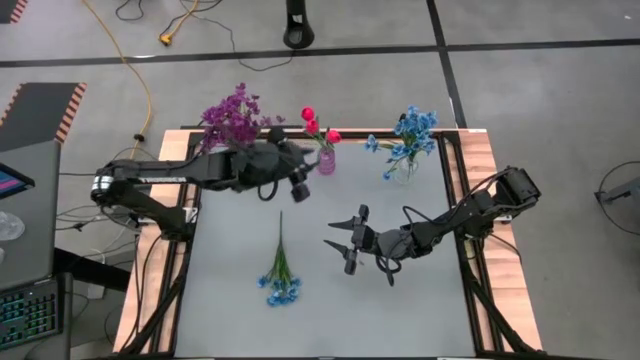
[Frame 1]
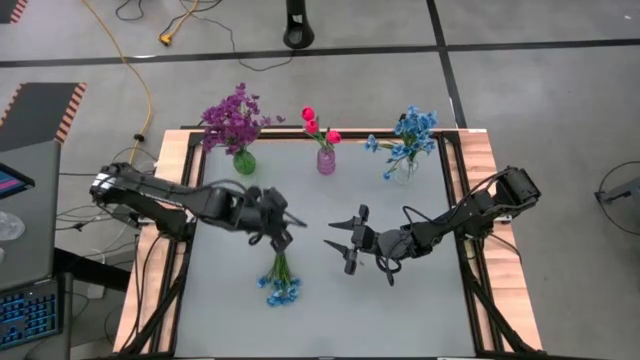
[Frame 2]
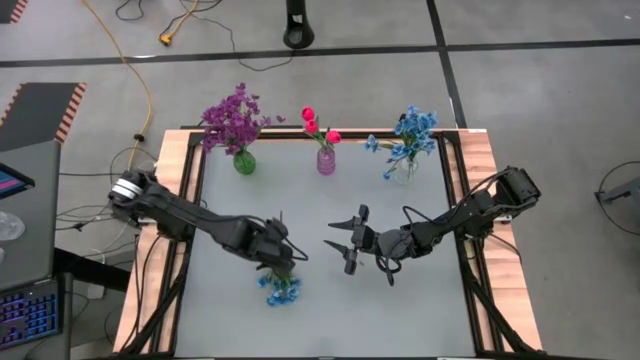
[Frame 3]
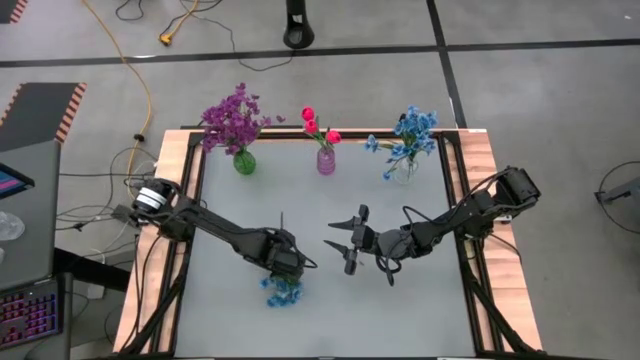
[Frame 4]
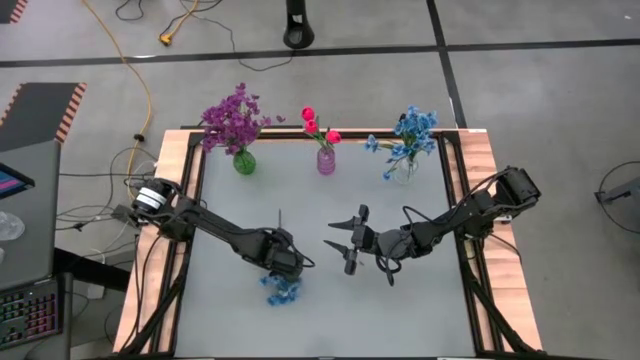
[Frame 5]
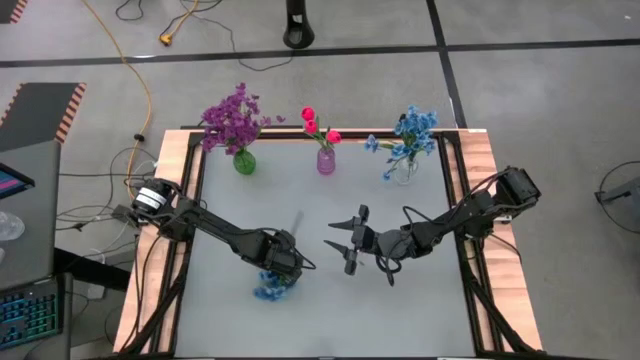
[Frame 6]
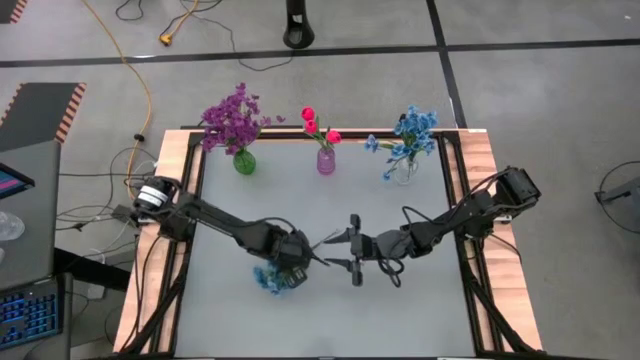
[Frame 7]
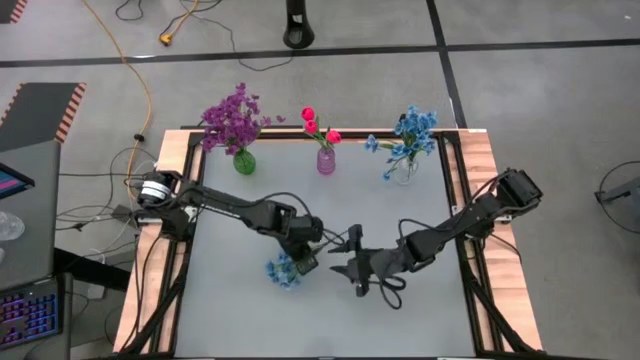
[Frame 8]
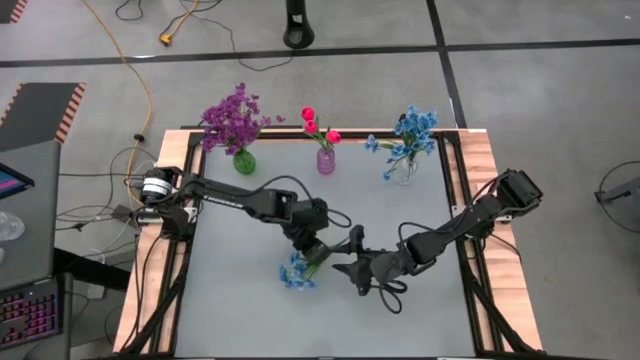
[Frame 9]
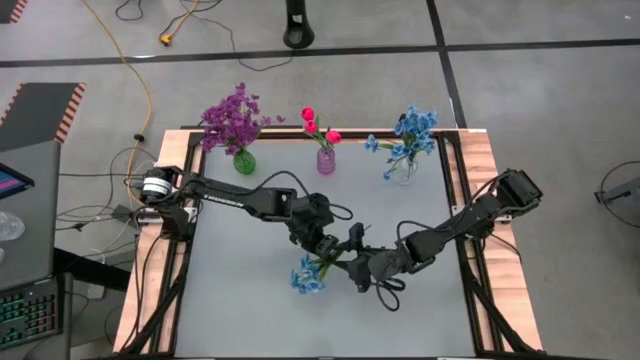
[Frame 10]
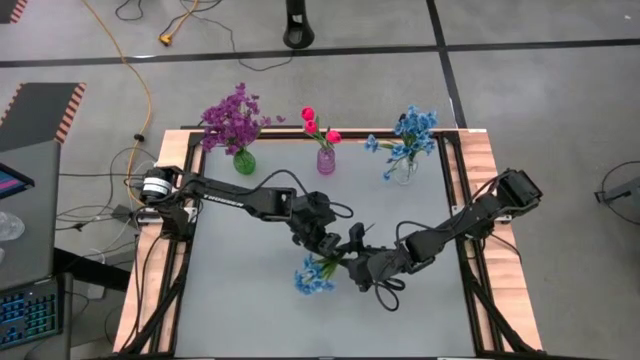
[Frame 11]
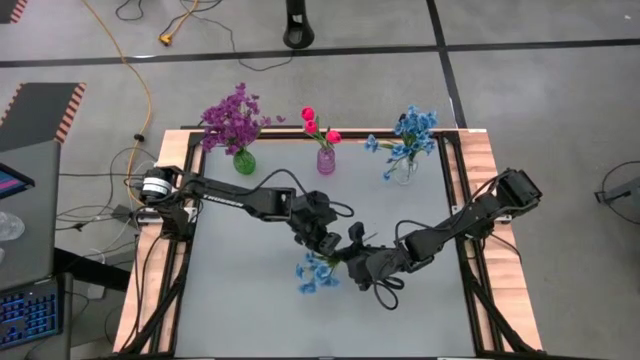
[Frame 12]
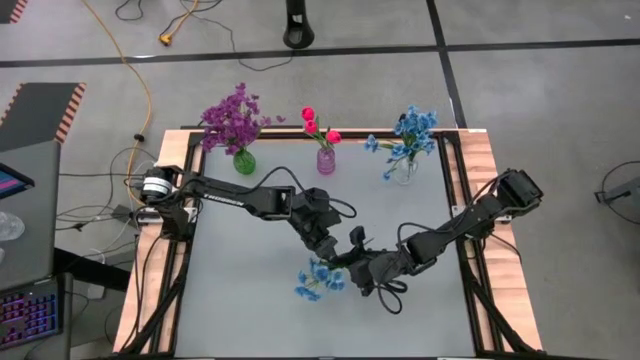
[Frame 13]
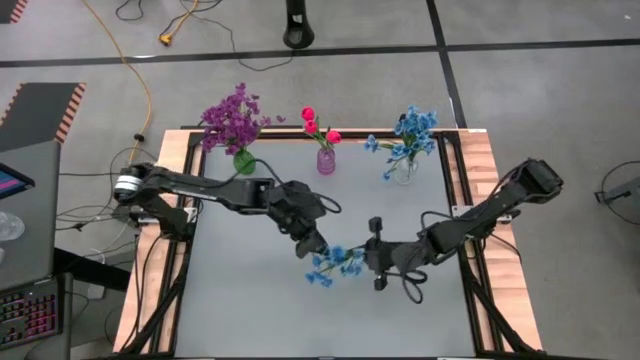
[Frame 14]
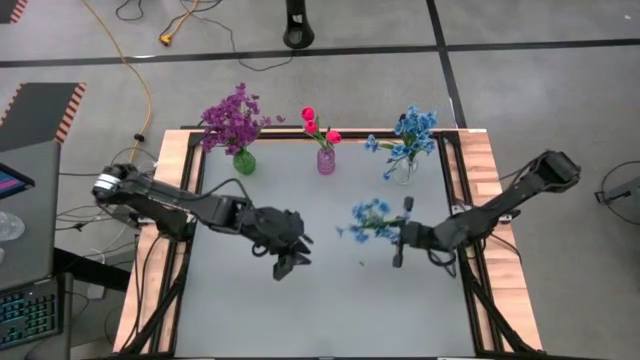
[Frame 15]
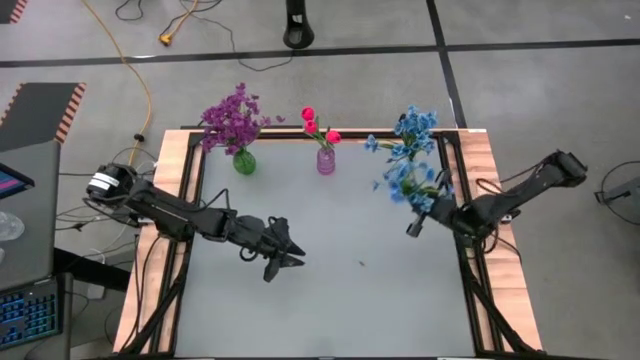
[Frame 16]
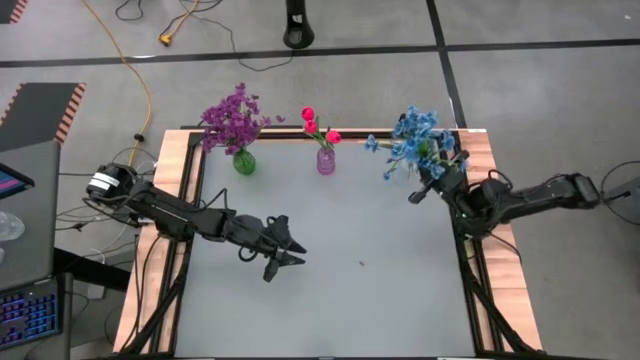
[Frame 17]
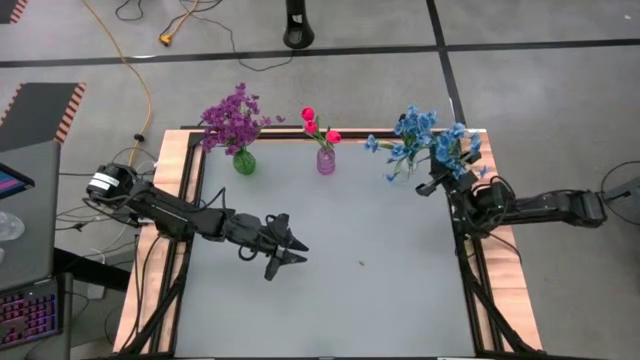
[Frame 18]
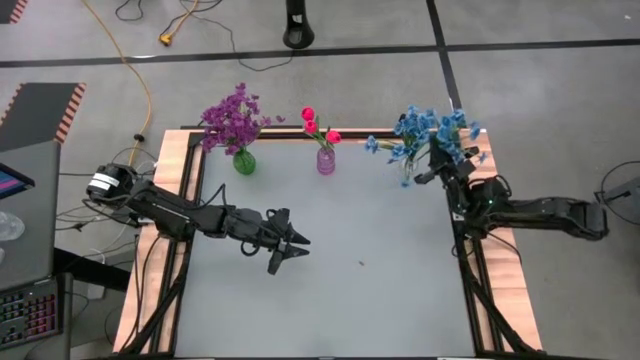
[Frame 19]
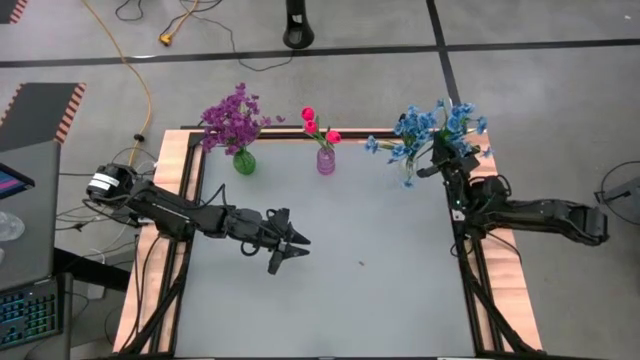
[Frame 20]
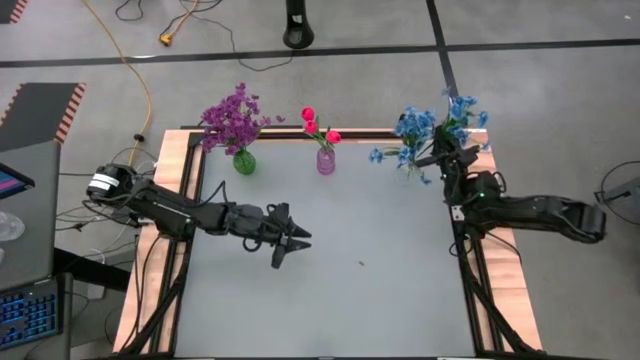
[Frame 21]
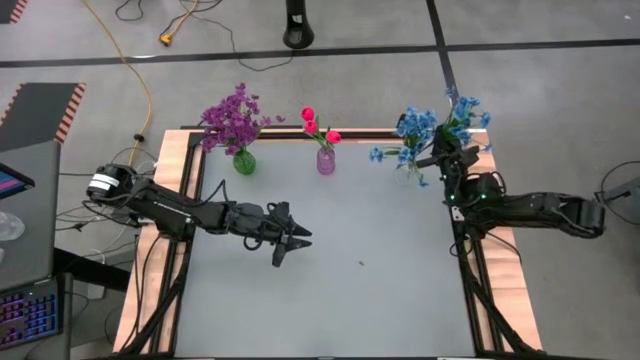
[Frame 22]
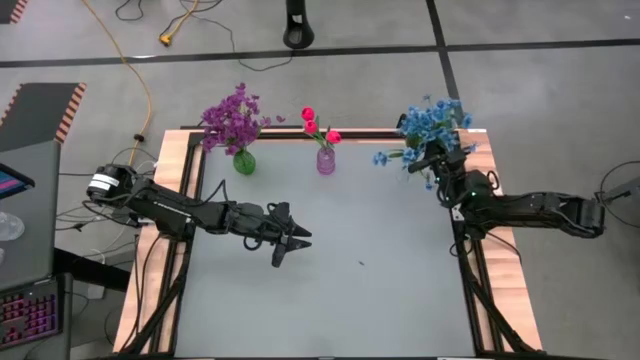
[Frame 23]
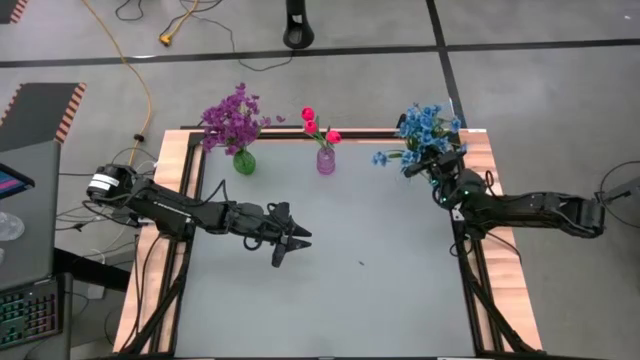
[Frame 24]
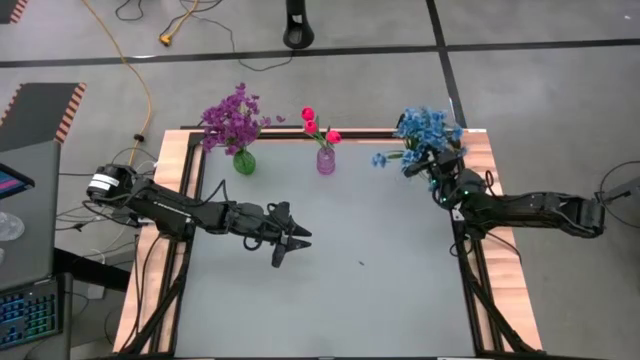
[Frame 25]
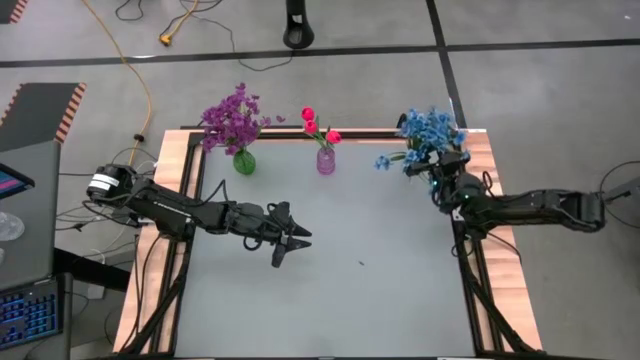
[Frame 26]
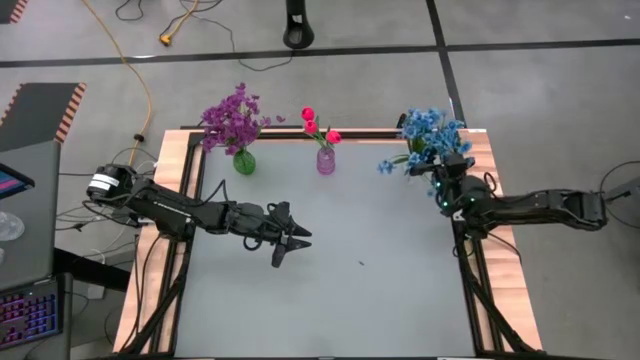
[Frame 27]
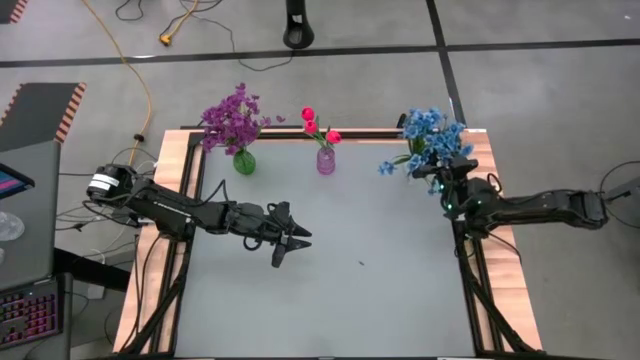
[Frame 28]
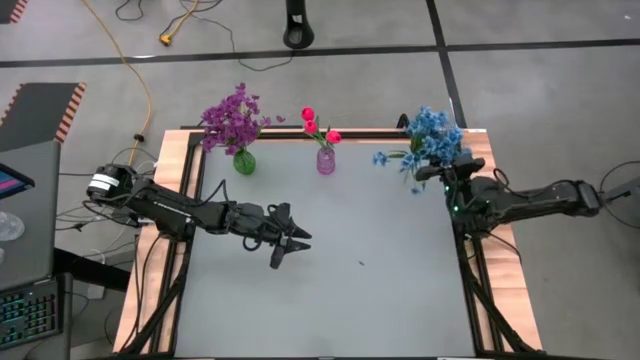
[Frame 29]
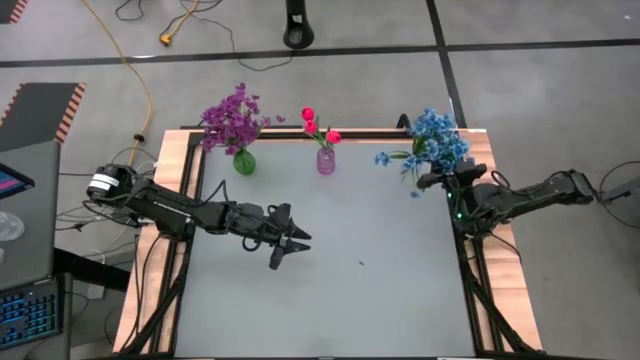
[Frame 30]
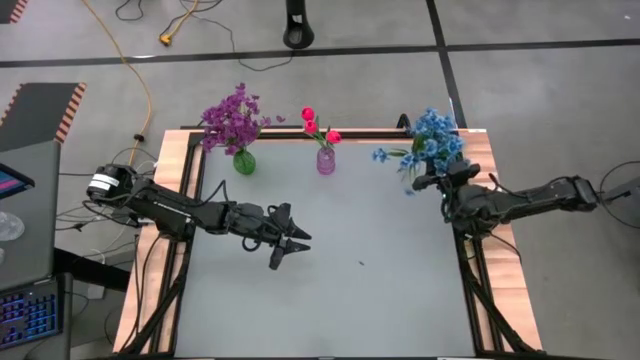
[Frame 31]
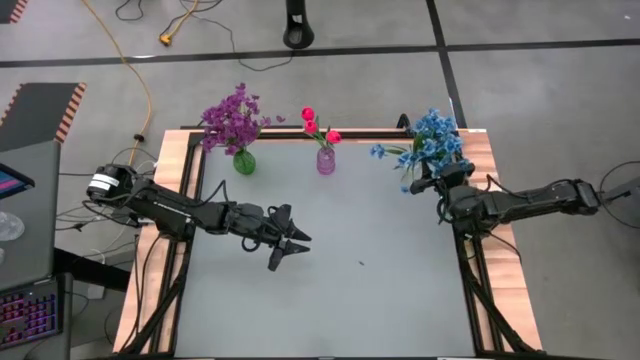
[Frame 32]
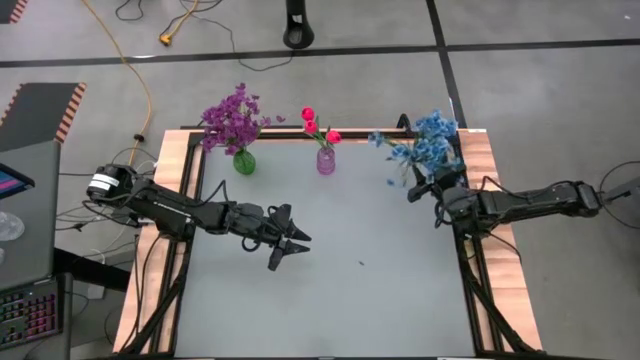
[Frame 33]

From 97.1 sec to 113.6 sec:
Task: Sort flowers into vase by color
Put the blue flowers into the transparent vase

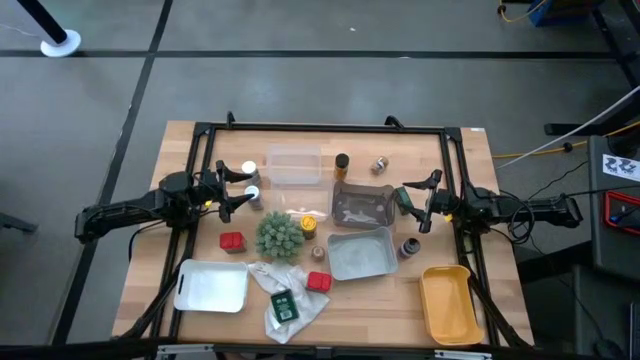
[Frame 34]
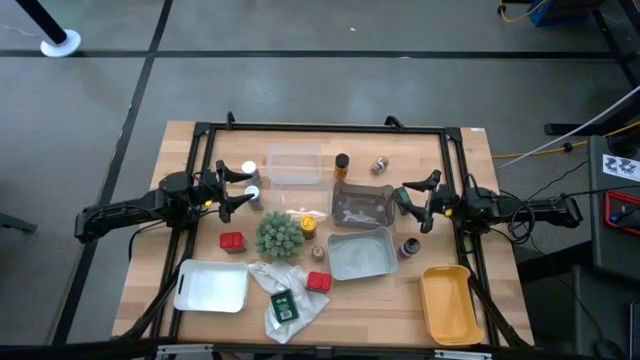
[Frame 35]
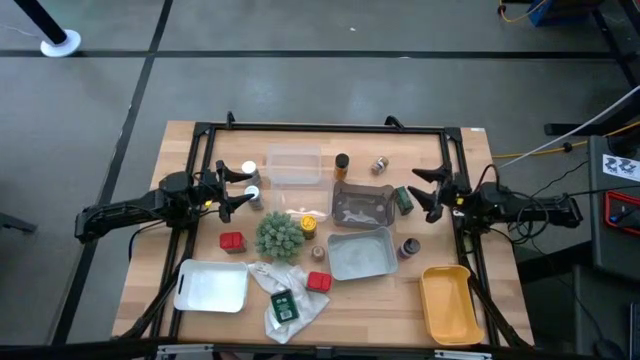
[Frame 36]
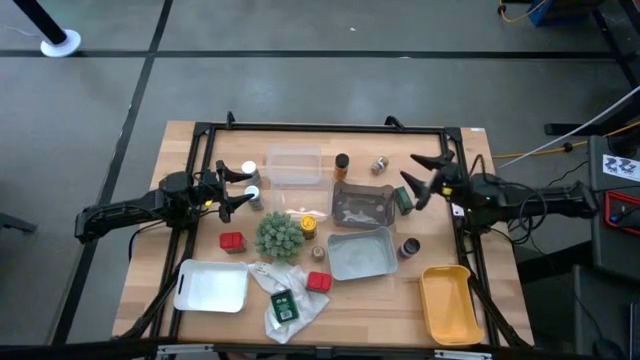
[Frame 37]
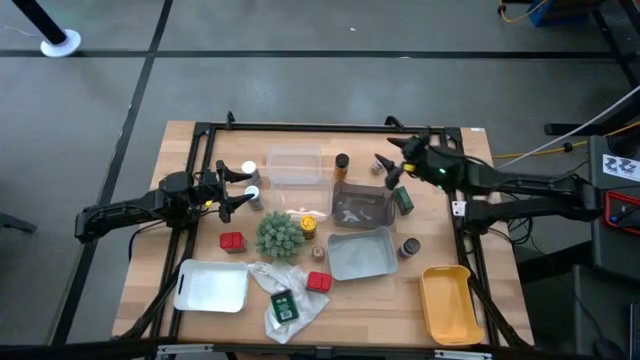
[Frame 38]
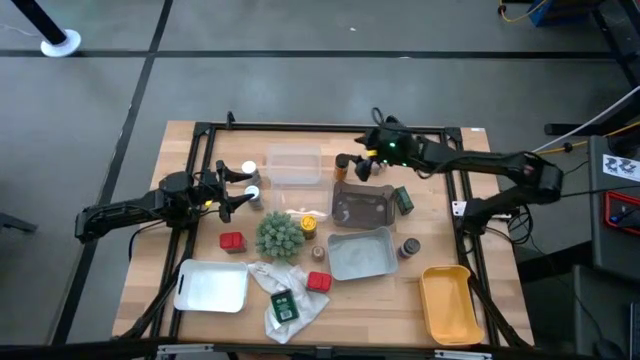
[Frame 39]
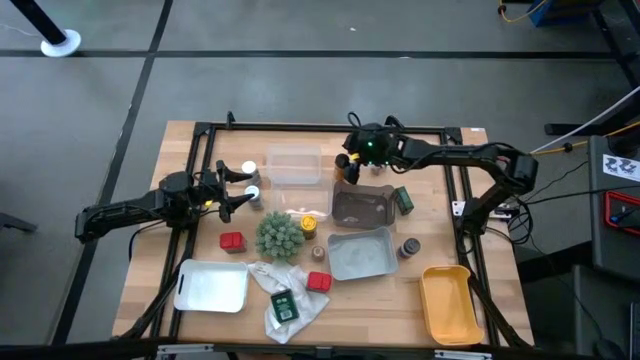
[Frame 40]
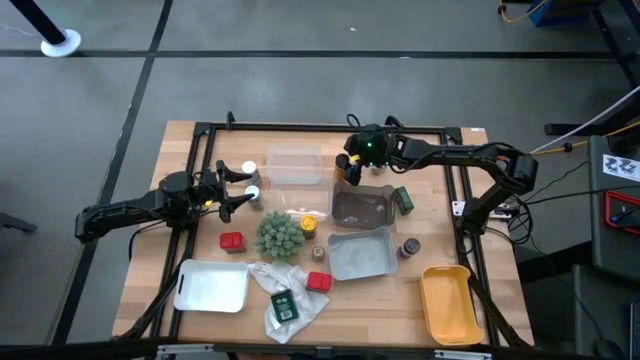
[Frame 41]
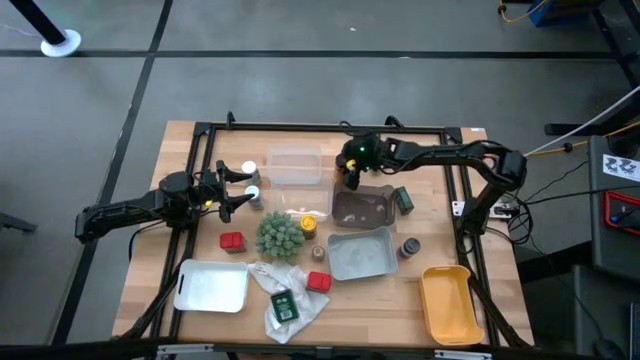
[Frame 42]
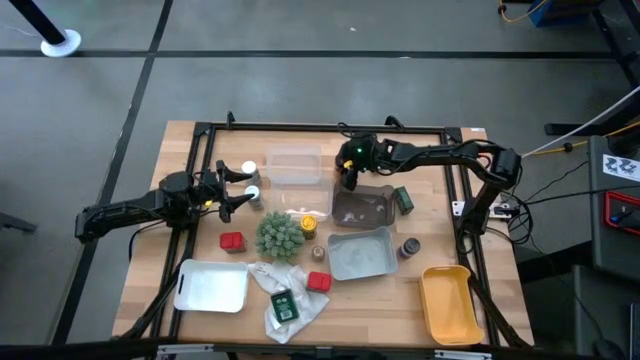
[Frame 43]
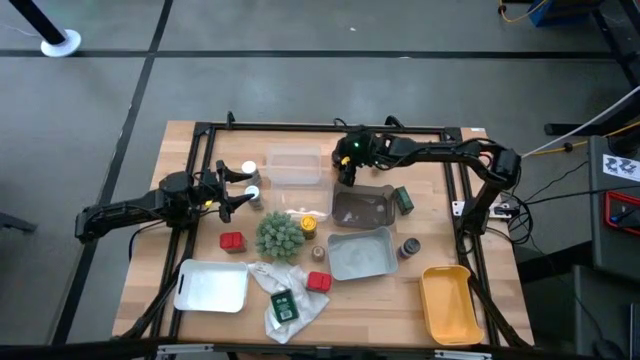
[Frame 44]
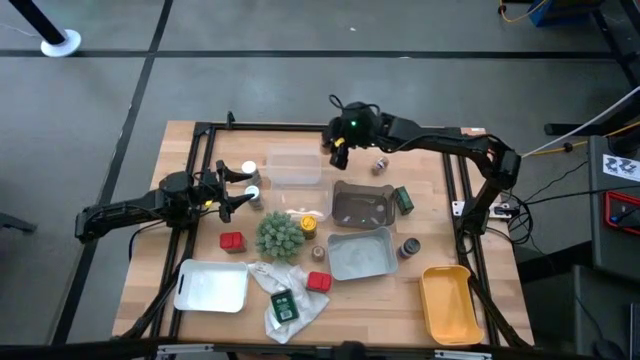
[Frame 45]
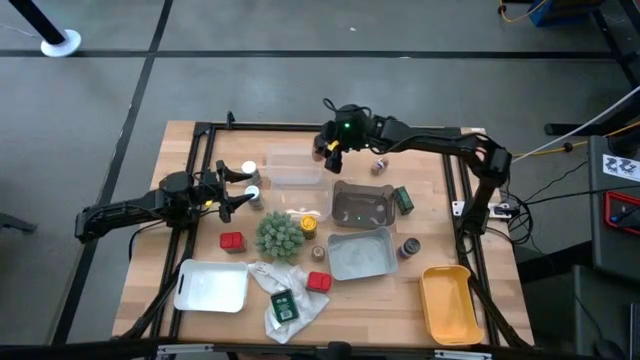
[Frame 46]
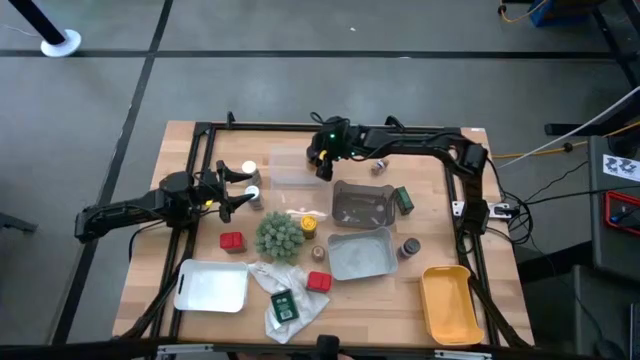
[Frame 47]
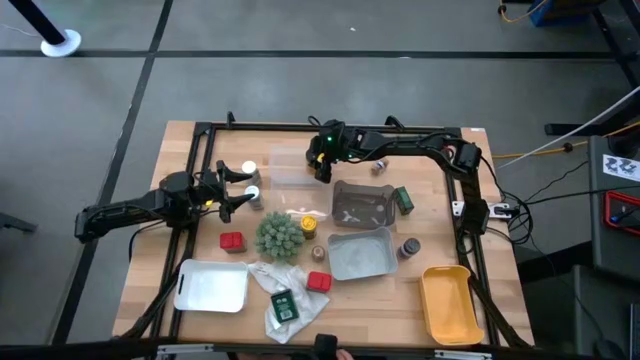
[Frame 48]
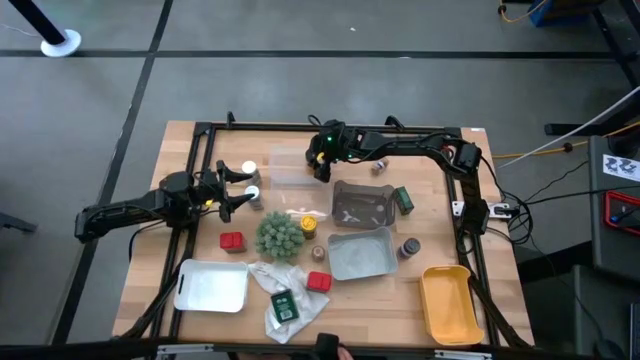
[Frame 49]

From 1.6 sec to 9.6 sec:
Task: Sort spices by type
Put the top black seasoning bottle into the top transparent bin
